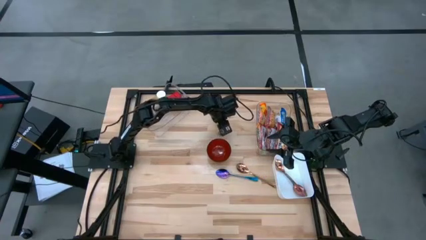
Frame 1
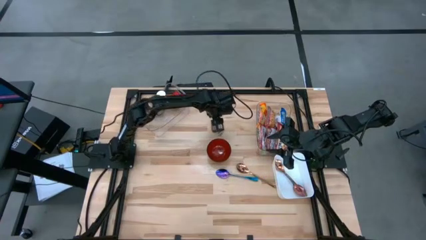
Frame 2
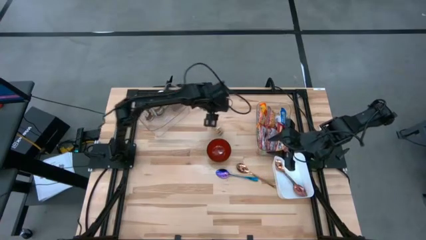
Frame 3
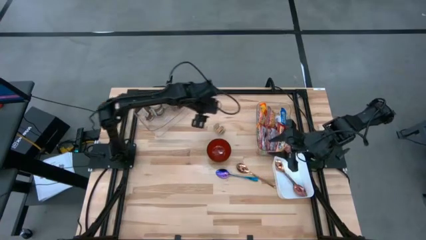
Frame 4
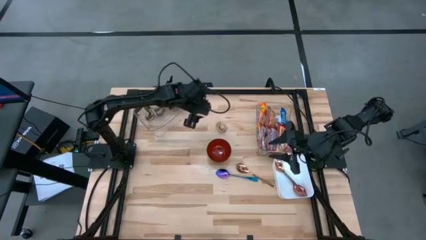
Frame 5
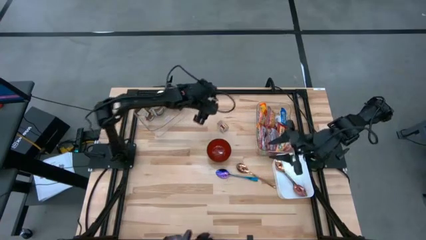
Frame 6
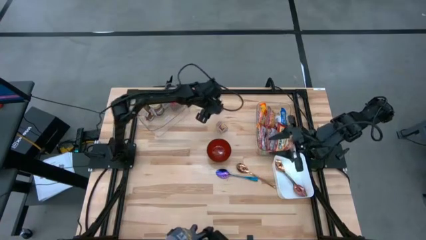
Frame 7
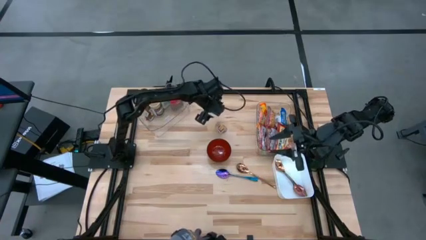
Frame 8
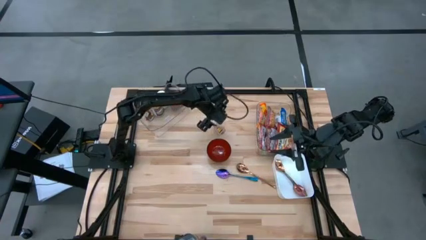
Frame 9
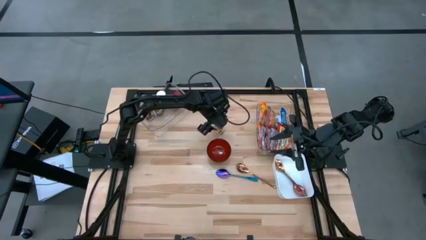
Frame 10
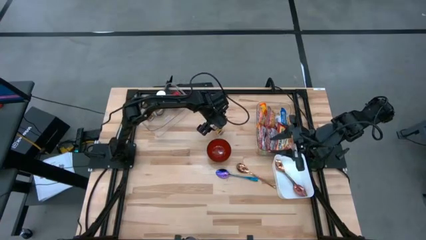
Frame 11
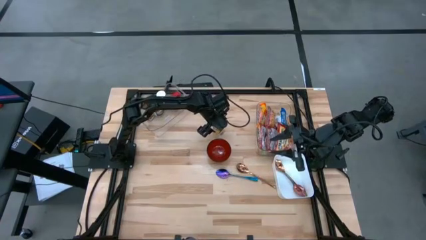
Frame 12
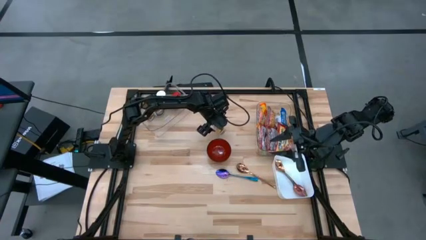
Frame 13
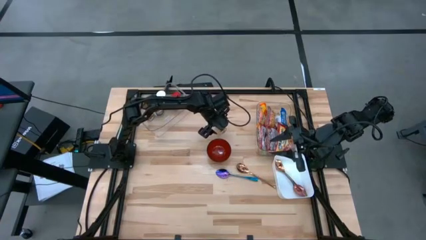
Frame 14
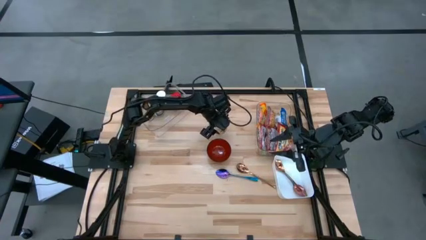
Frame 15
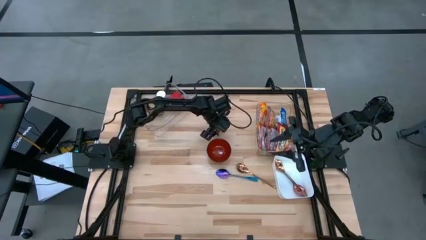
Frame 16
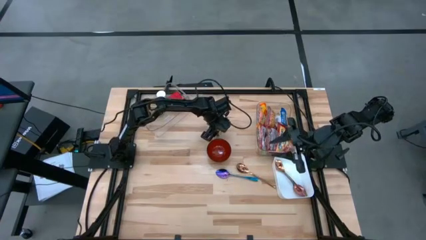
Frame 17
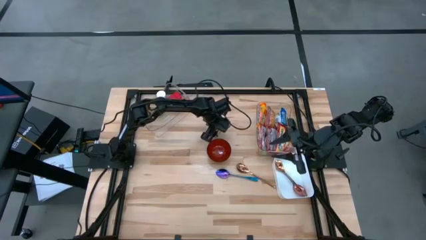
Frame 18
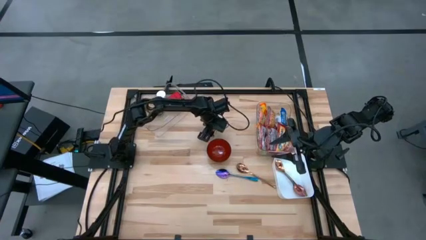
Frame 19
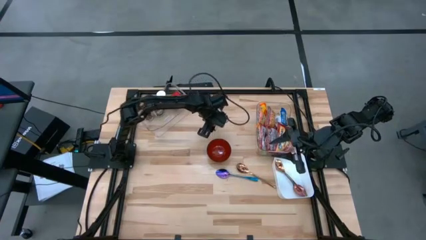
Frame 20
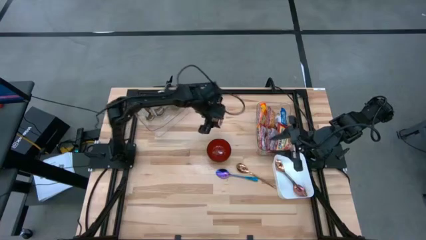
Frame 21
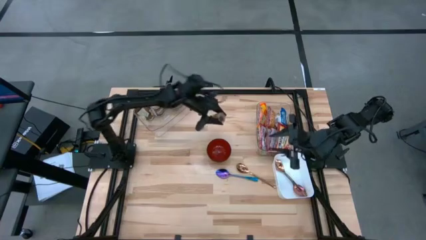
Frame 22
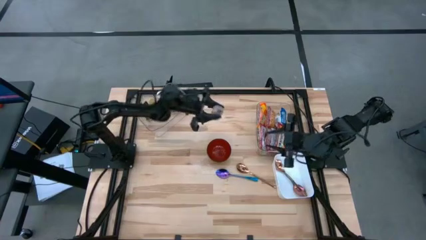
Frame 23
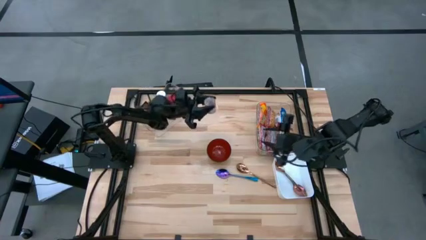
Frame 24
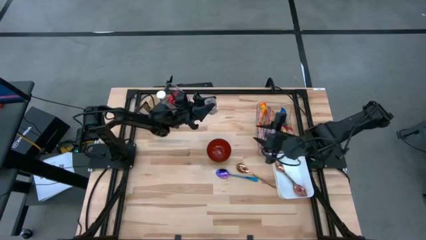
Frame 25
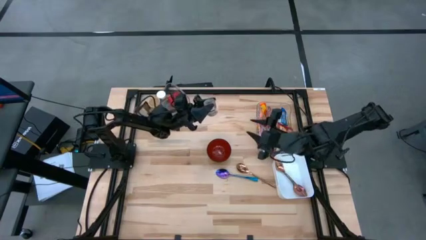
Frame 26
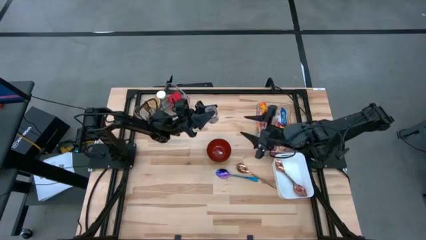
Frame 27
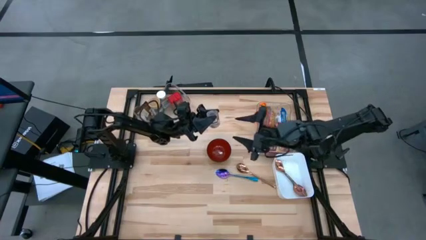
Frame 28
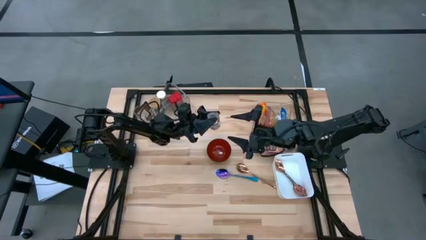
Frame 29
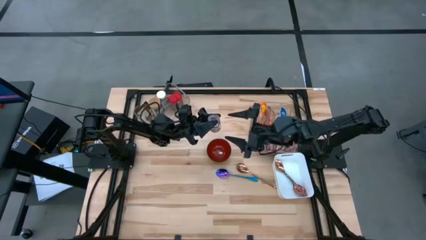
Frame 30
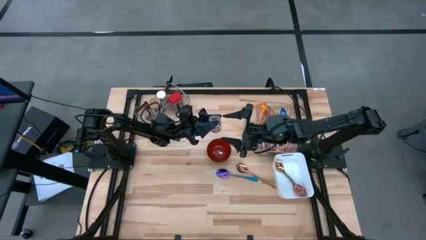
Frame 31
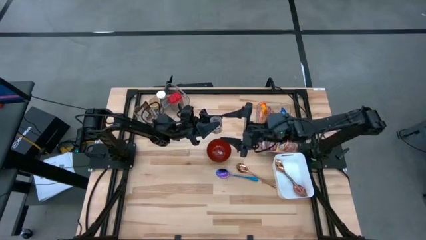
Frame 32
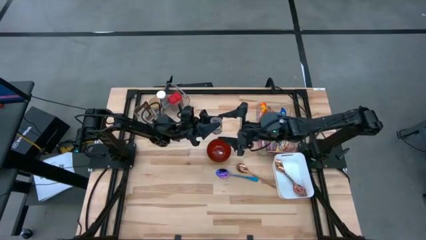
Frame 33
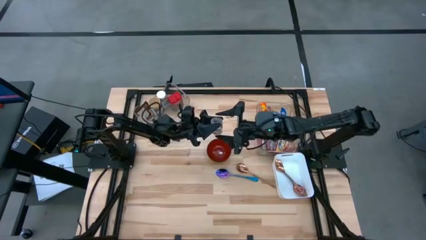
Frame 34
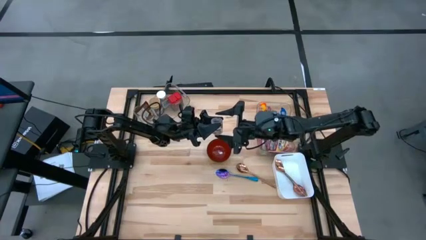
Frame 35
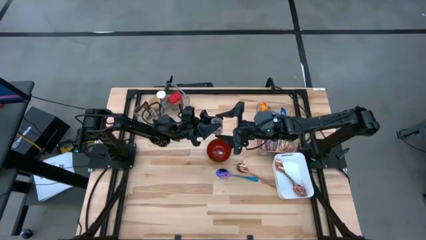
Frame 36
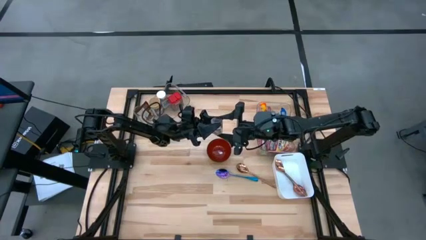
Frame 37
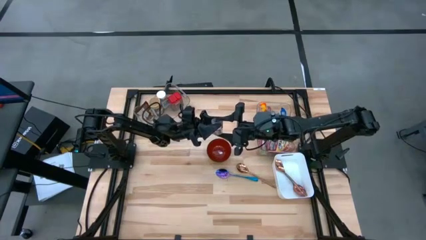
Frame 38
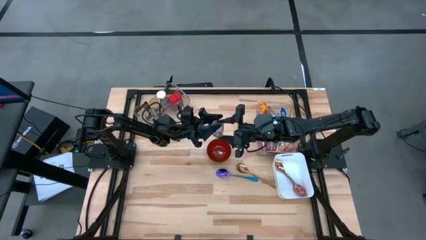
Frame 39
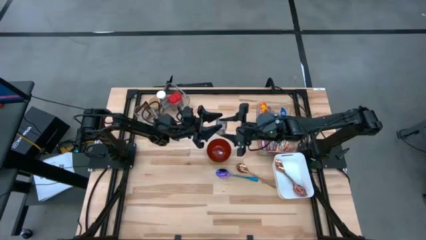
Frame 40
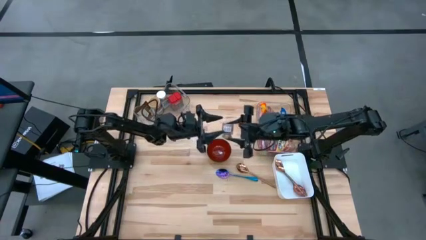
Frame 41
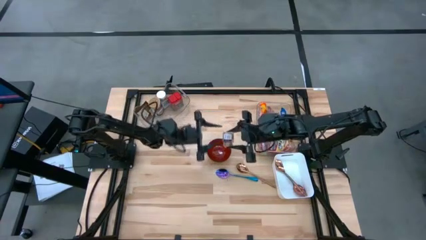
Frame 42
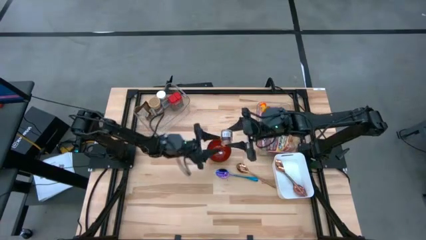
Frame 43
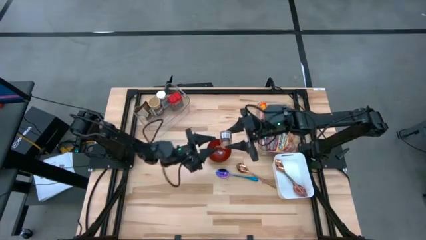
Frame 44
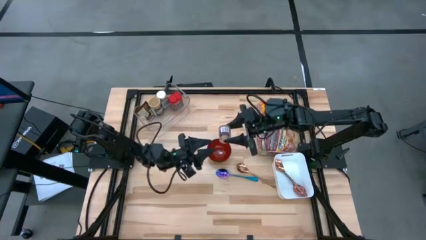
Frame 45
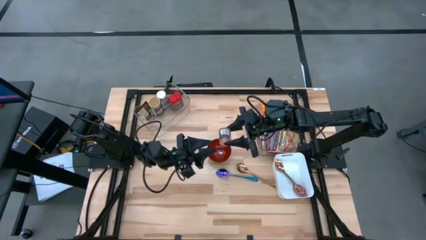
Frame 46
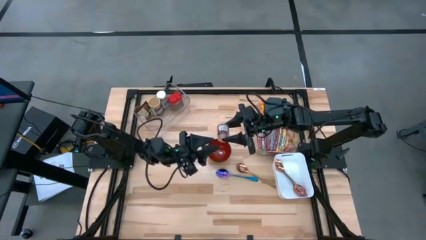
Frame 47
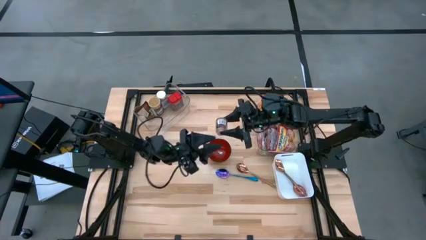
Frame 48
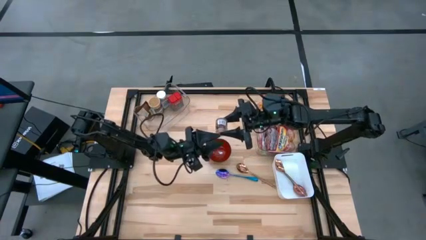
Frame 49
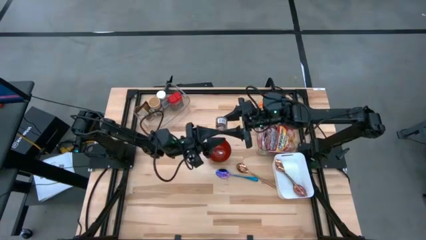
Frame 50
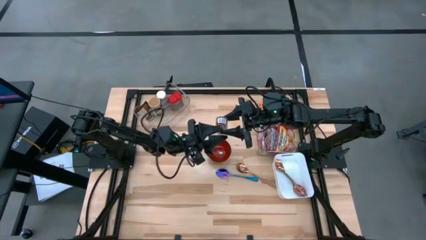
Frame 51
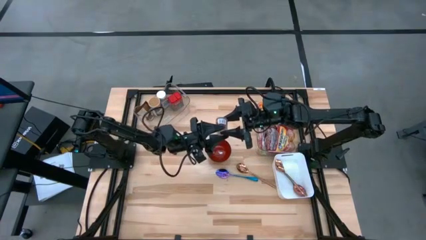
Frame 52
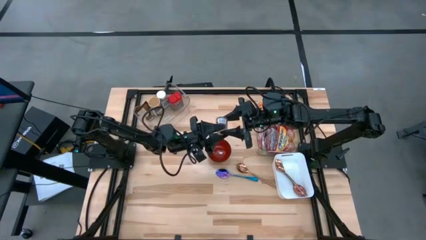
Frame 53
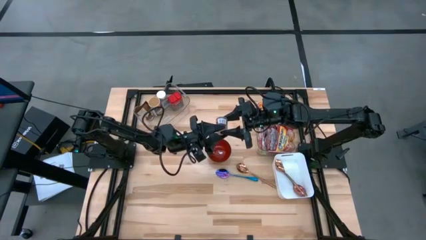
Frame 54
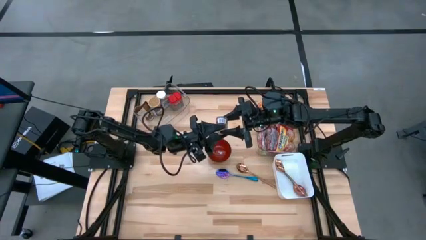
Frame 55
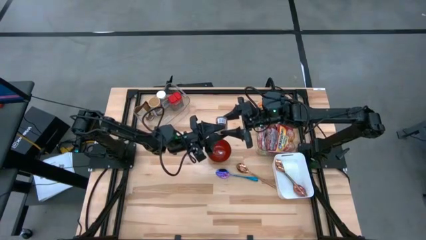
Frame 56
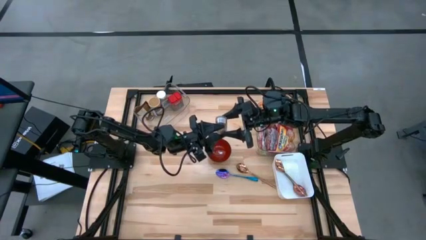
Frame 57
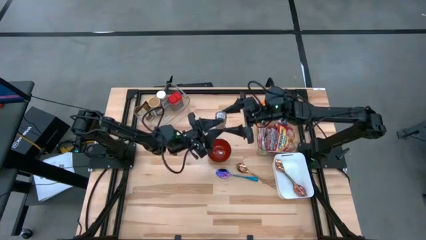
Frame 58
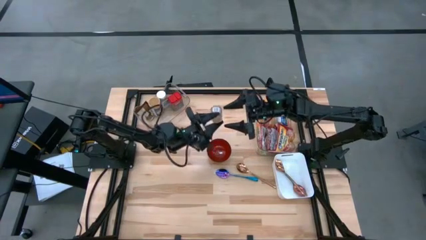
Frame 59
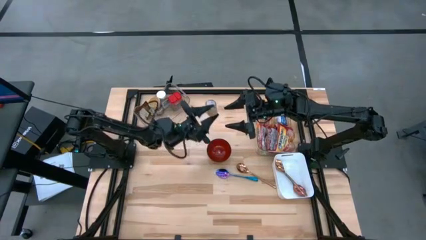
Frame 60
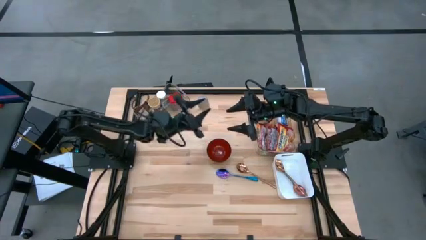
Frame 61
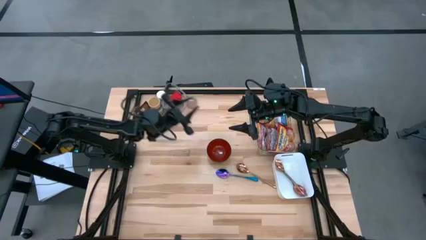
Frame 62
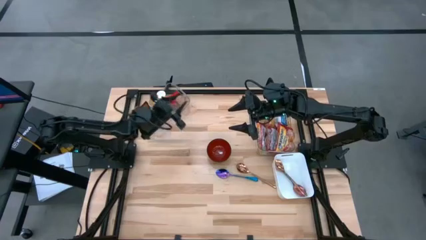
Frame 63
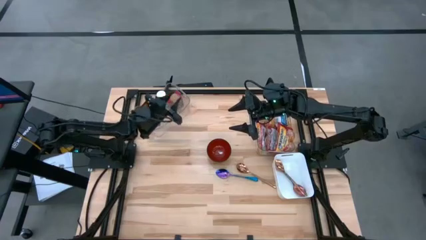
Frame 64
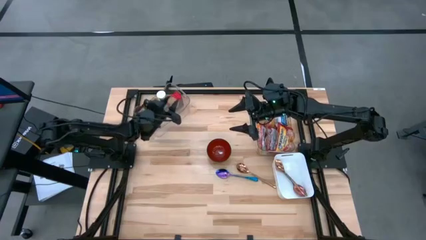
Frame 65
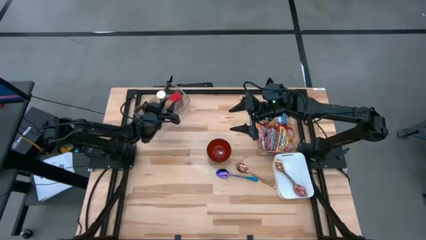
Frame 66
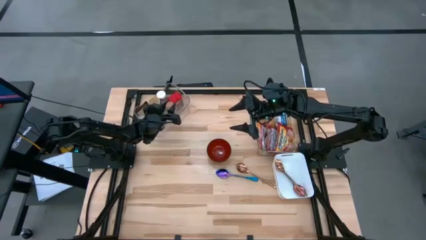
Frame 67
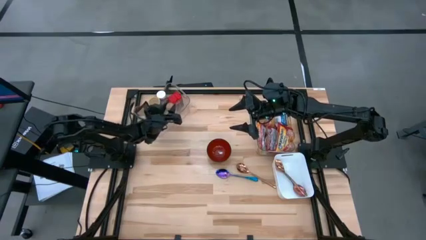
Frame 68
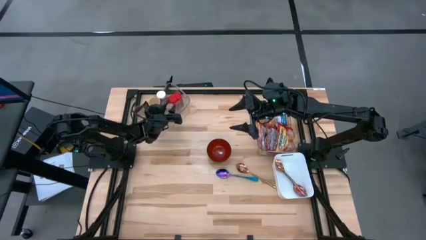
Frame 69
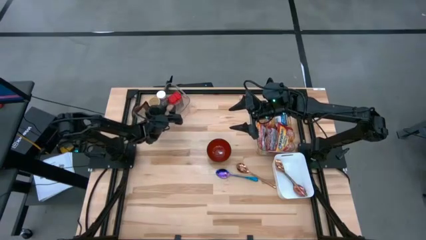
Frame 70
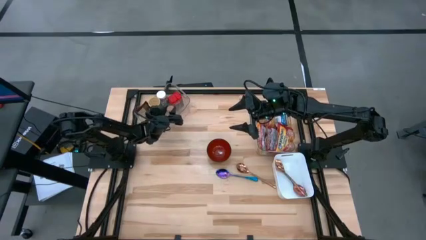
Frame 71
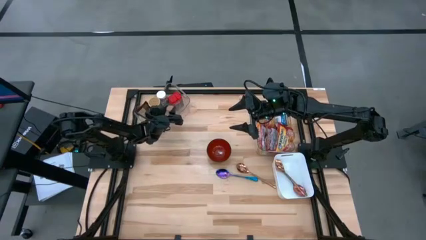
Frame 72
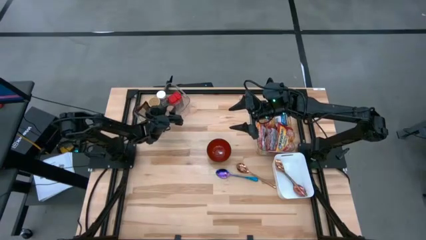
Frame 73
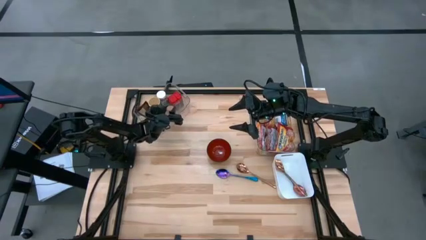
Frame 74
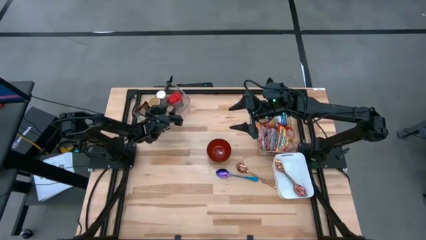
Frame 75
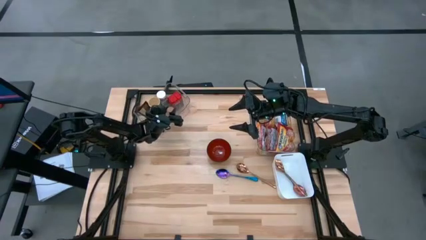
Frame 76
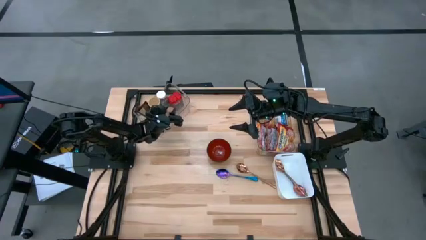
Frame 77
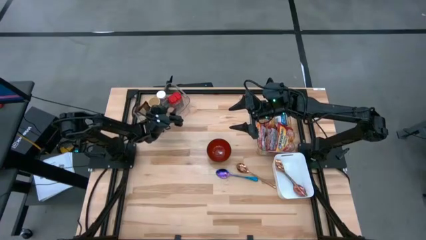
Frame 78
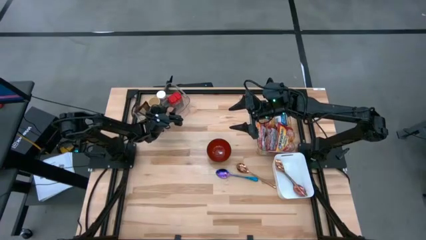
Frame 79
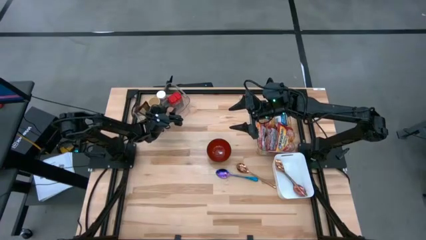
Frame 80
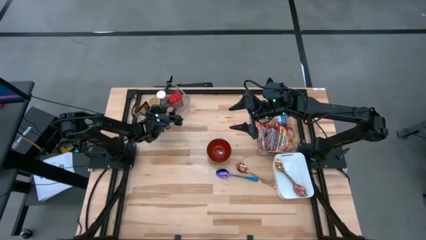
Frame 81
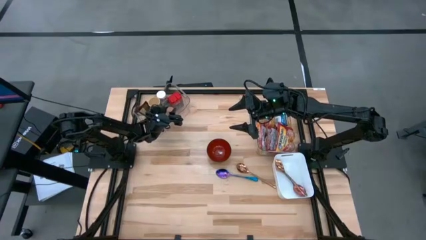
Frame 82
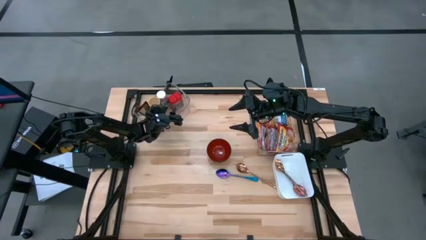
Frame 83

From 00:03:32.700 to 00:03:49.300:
Task: Pick & Place Food Item
Put the brown seasoning bottle into the left transparent bin

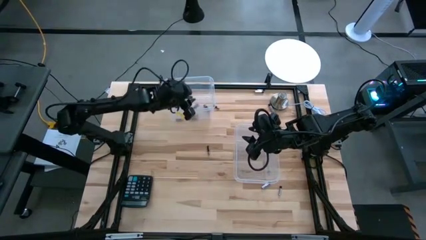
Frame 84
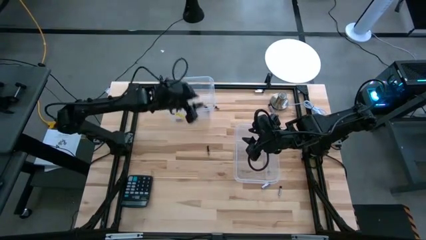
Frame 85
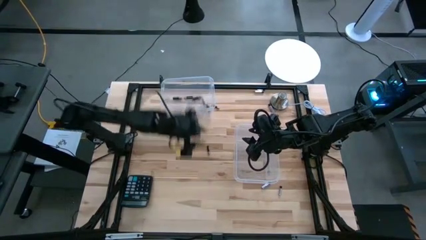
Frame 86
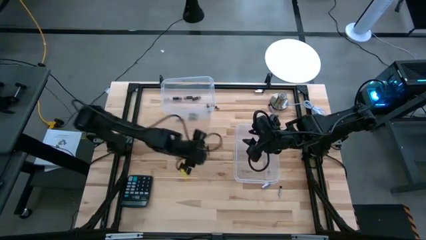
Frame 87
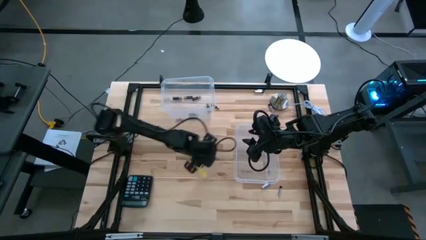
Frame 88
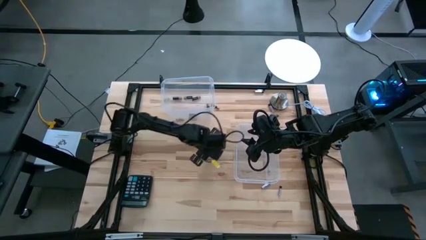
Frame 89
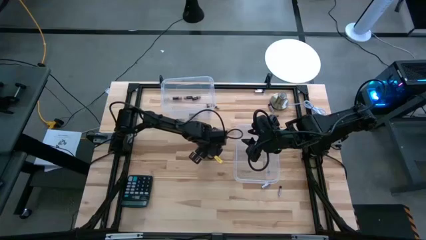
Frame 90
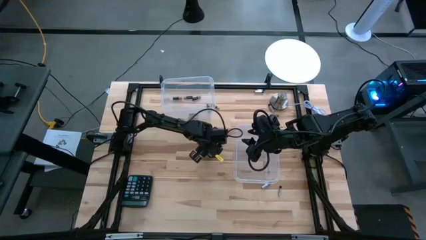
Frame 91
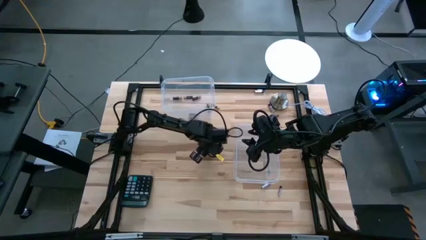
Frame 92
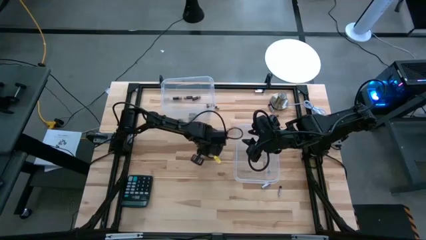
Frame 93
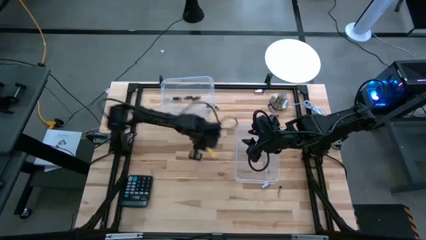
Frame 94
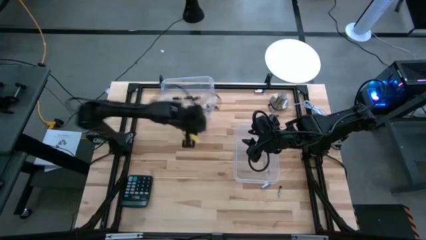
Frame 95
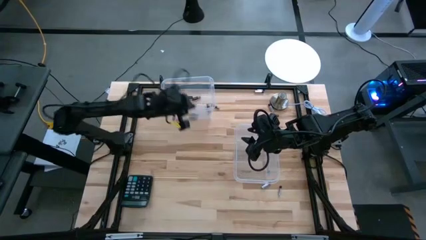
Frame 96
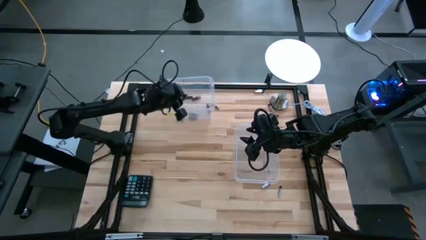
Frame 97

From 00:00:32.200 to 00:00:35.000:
Task: Sort batteries
Put the black battery into the left transparent bin
